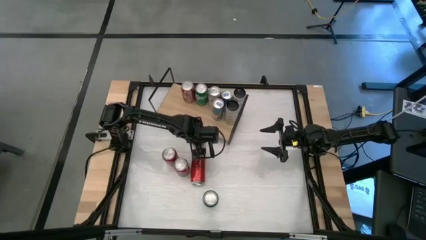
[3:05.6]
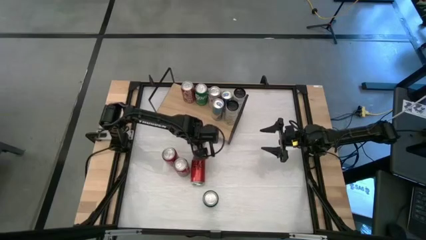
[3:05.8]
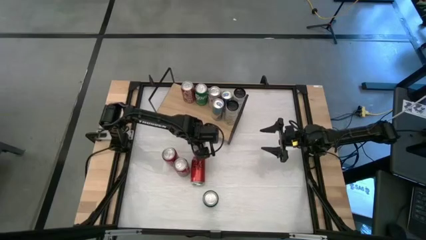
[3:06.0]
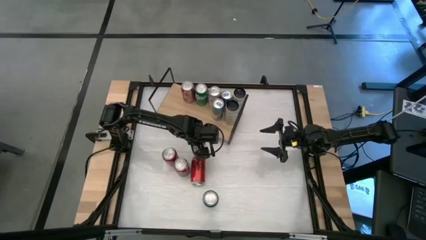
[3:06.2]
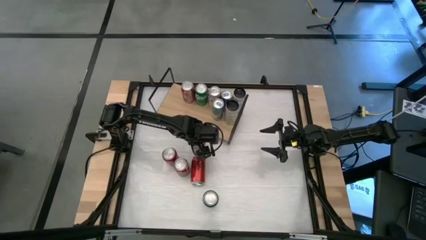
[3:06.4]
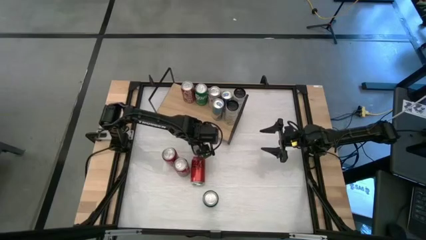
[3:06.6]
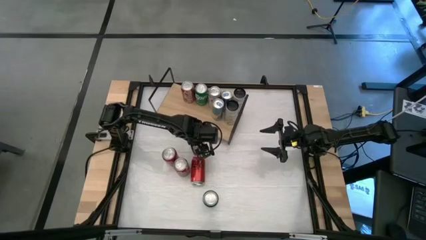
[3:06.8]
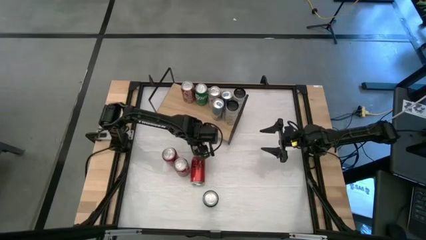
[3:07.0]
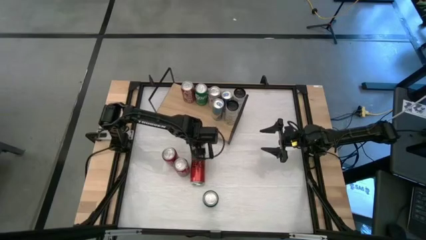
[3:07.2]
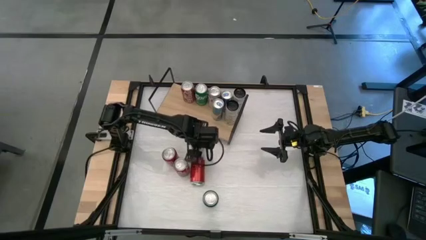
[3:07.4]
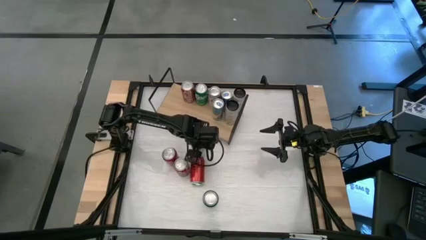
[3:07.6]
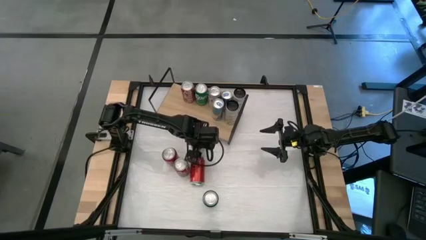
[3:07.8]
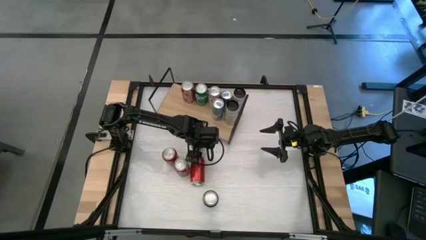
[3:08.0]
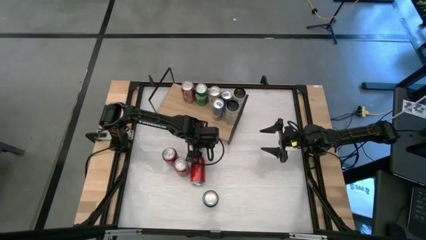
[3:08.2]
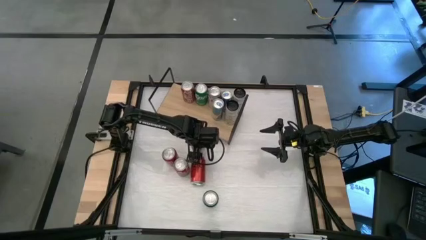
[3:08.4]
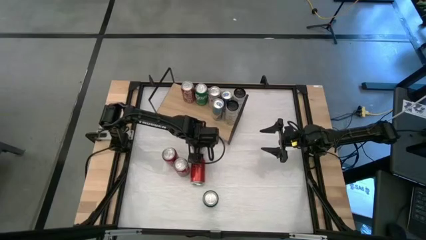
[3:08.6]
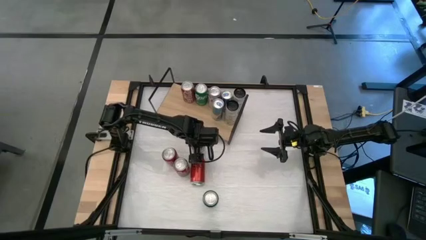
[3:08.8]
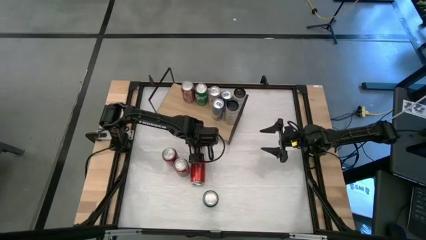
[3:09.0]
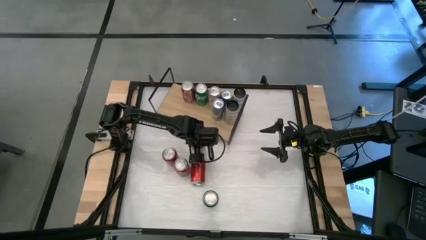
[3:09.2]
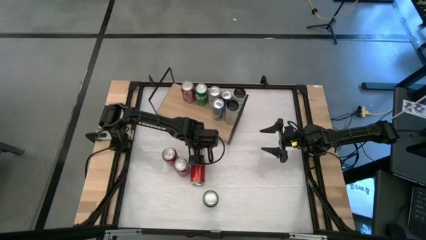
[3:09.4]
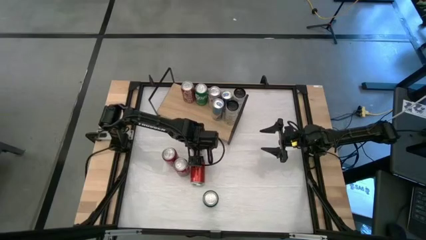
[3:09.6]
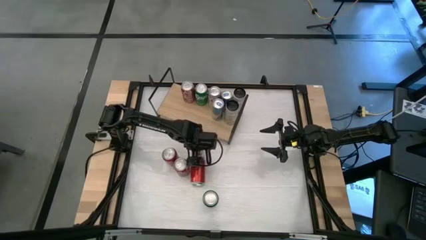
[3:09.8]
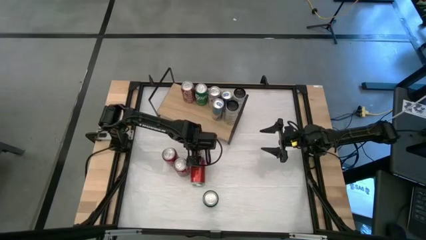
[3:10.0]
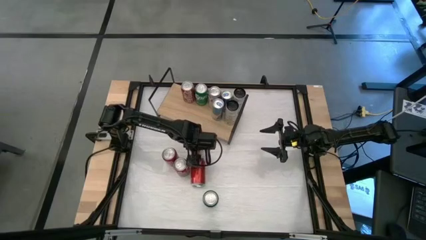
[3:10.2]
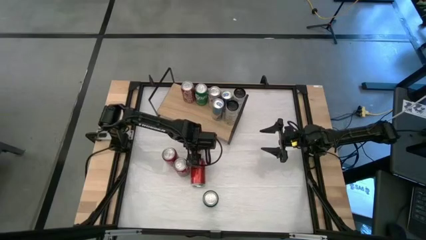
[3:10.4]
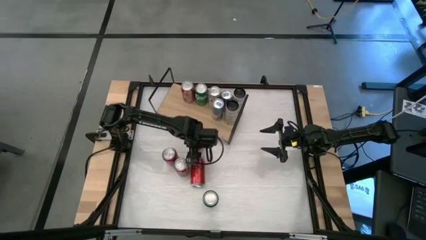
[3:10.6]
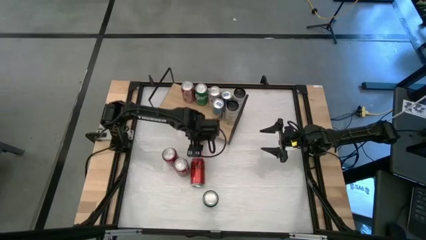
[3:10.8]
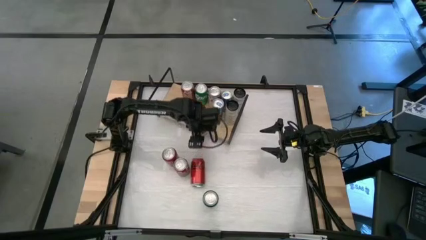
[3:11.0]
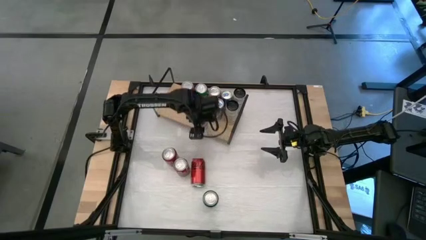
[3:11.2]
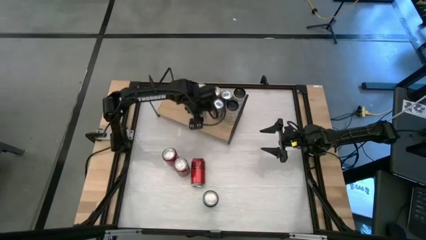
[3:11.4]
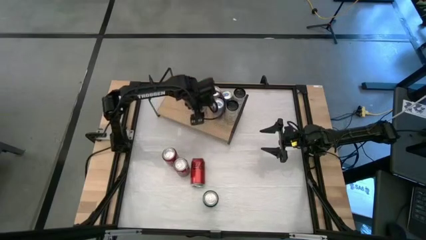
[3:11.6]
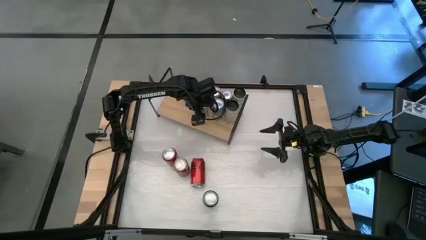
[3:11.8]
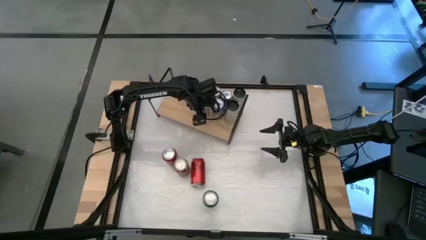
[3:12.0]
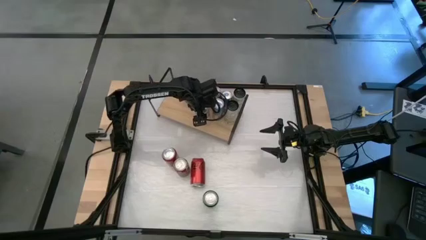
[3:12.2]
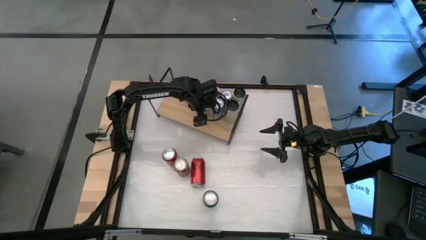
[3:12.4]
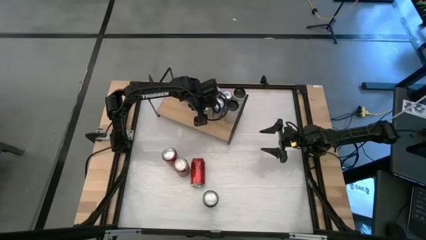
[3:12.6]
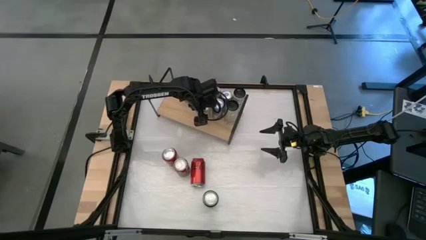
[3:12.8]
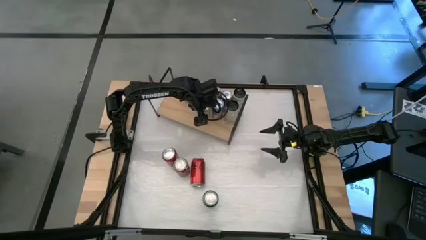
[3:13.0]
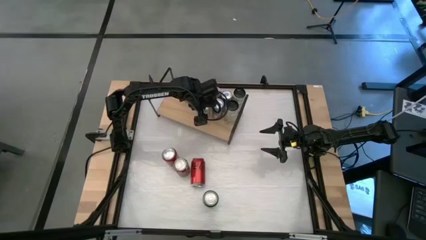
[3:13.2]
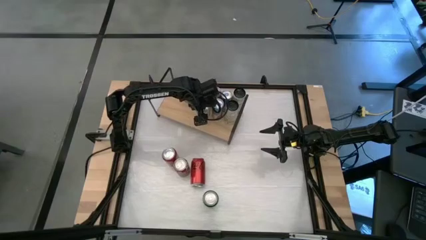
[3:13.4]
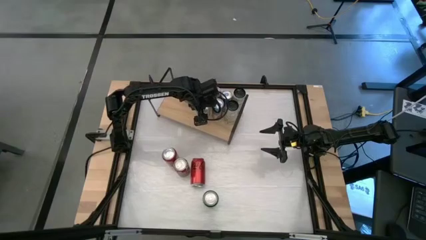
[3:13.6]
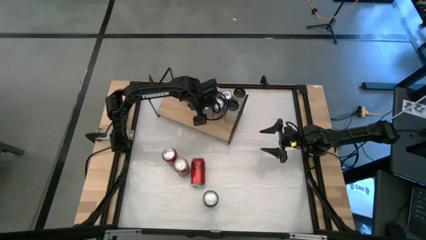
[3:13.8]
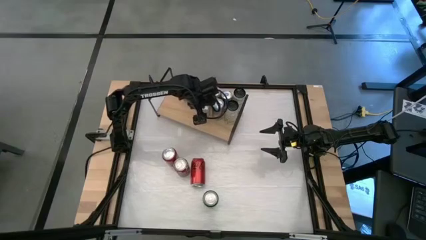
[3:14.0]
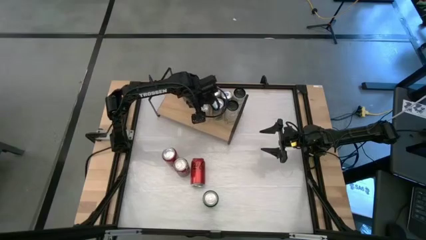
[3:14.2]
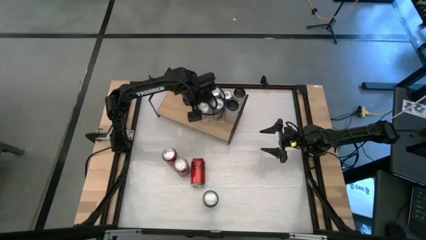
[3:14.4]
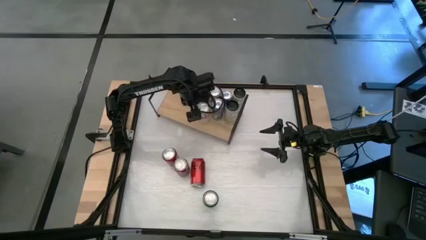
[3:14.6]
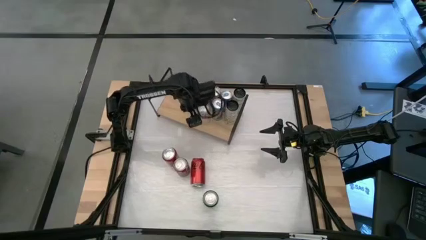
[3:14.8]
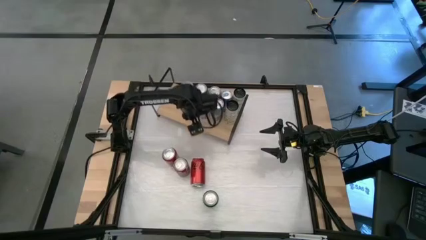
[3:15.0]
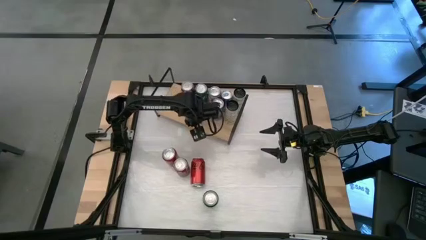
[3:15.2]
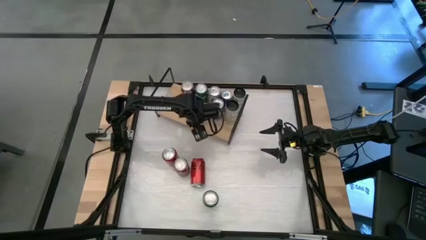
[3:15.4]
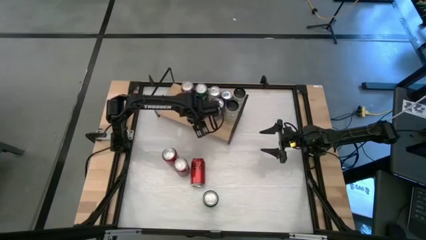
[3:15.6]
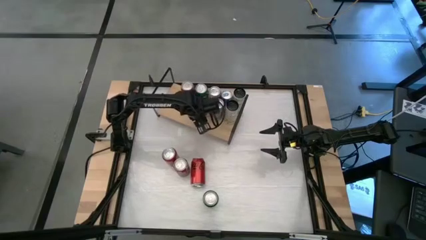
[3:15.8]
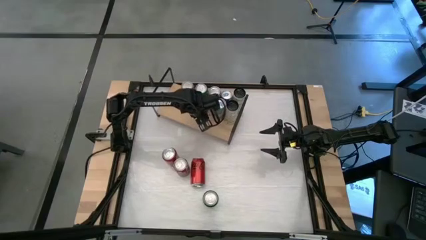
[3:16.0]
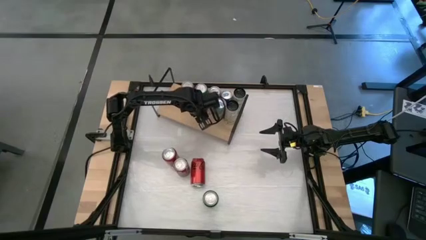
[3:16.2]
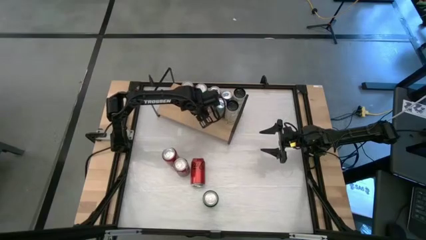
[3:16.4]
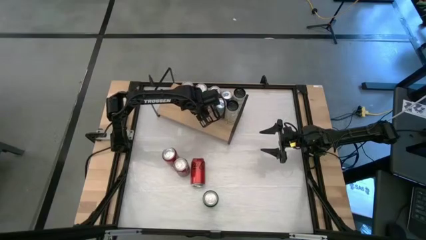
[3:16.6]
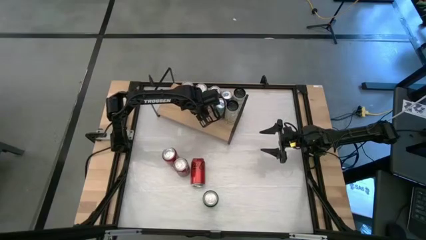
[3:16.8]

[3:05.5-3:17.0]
Task: Place canned beverage on shelf
Put the silver soda can on the shelf aligned with the other silver soda can

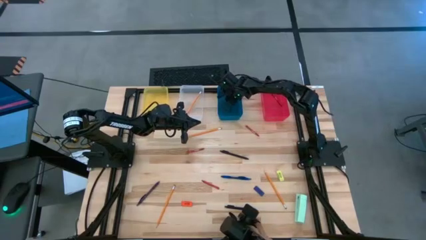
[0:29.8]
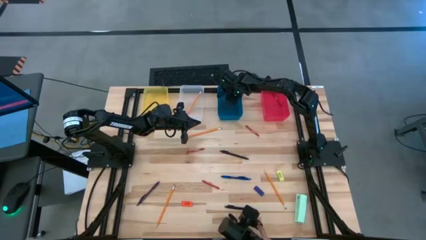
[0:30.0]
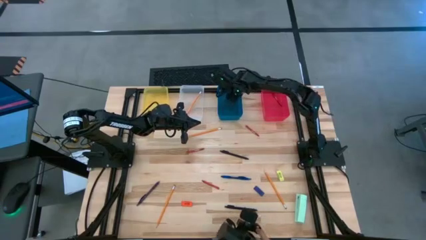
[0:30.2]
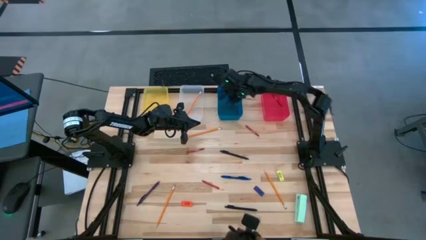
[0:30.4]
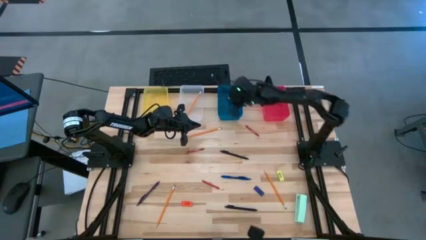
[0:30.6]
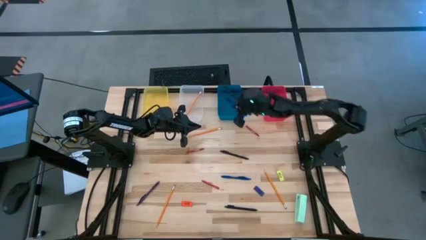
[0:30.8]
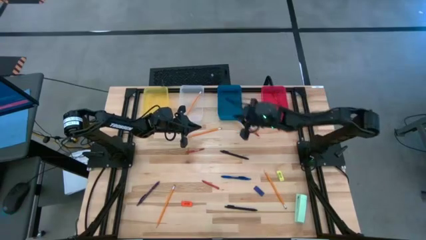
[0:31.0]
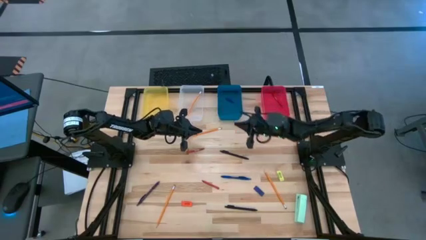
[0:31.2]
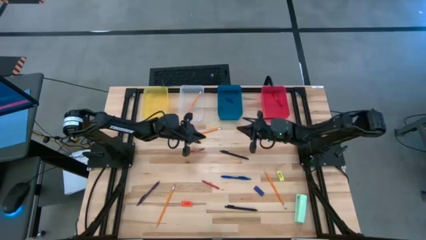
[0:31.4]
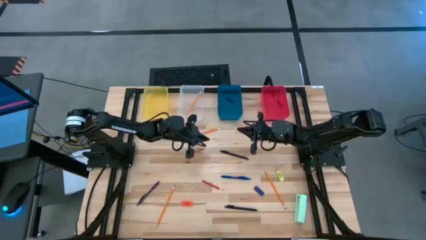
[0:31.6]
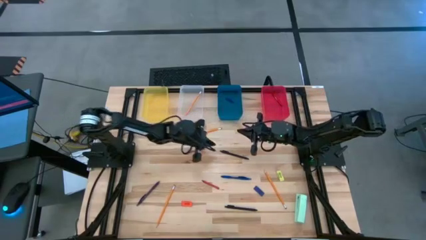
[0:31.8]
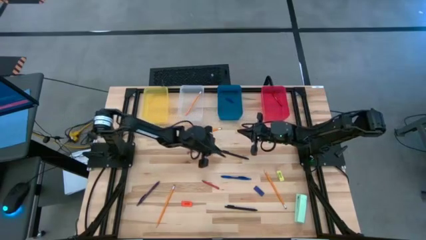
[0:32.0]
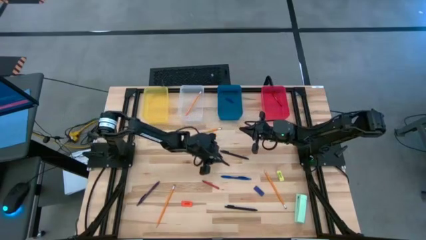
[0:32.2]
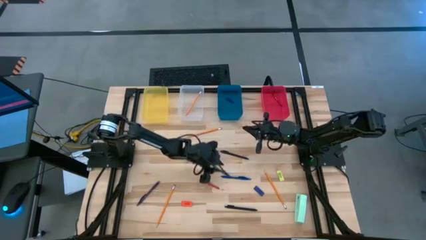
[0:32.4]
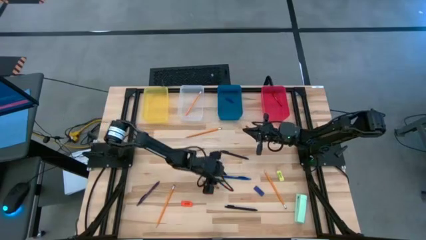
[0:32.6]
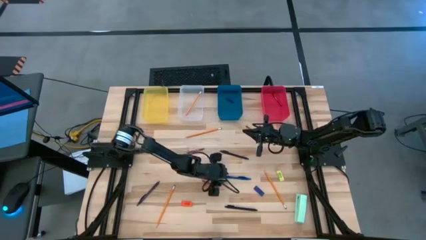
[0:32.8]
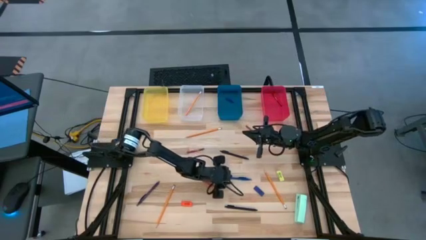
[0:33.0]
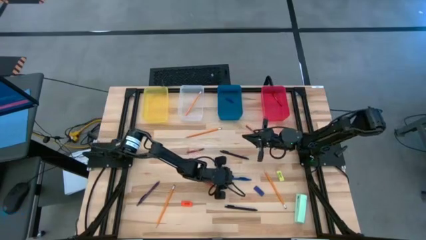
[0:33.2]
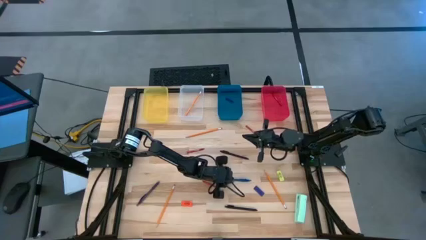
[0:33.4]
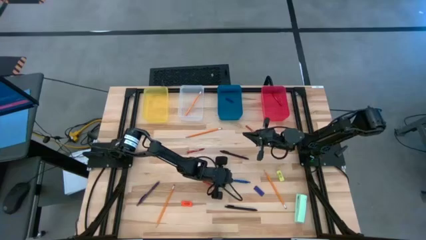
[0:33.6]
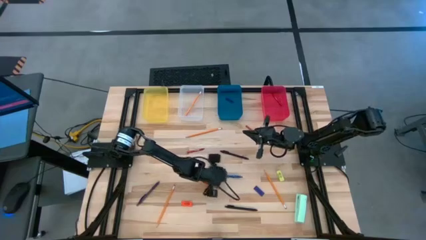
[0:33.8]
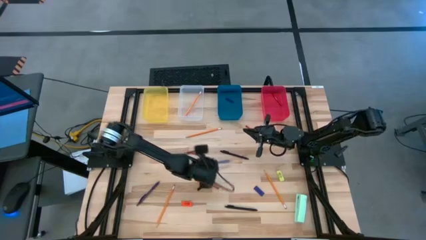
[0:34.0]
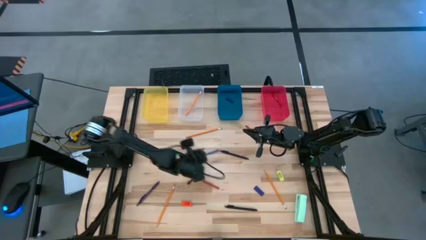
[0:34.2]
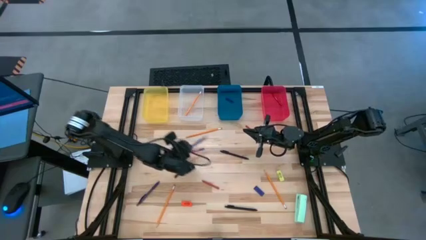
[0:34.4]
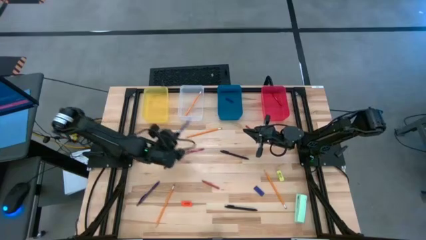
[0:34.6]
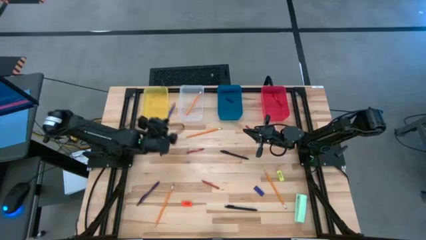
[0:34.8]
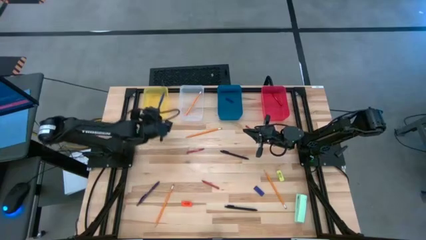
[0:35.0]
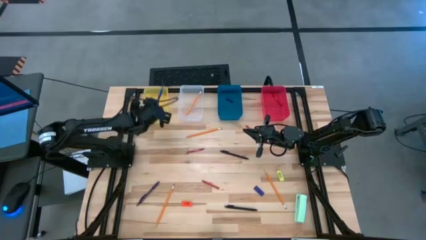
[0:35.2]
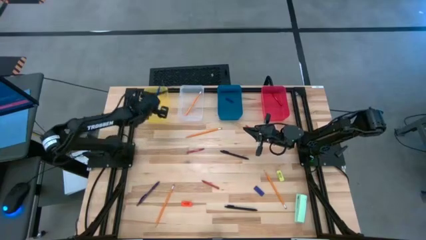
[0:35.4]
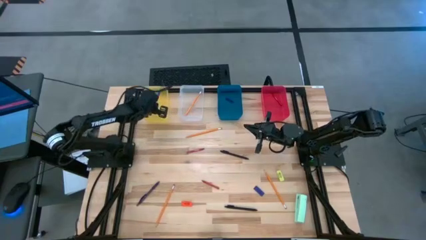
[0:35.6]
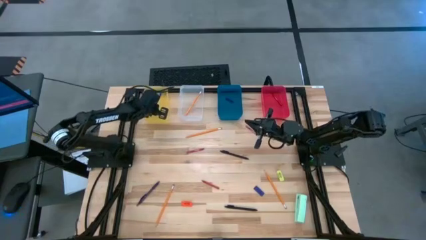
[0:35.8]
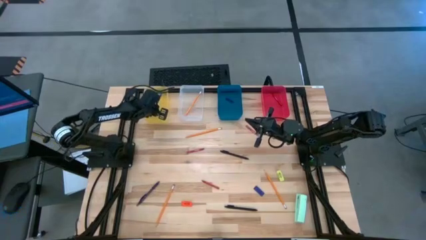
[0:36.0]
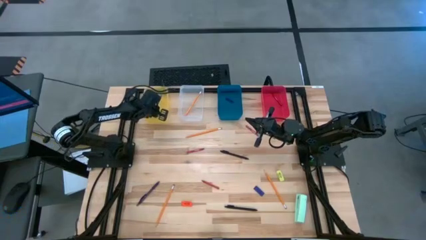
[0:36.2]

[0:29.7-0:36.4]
Task: Sort crayons/erasers/pens/pencils in bins
Put the blue pen into the yellow bin
